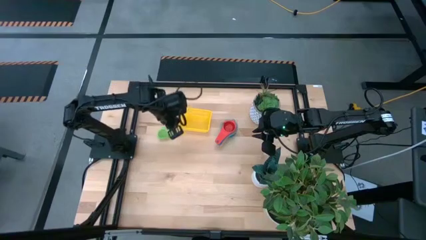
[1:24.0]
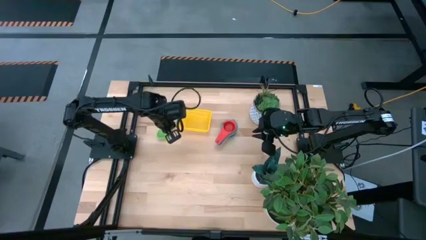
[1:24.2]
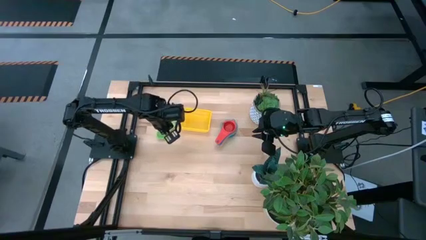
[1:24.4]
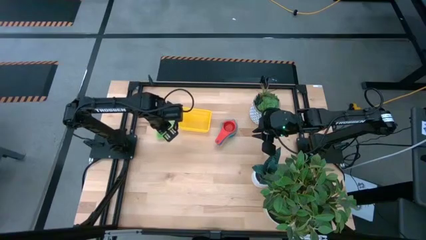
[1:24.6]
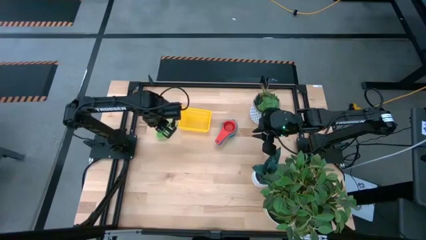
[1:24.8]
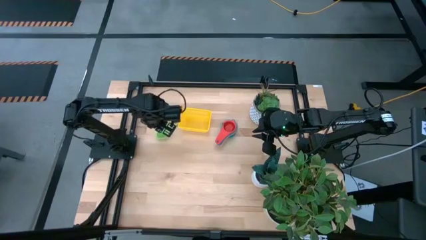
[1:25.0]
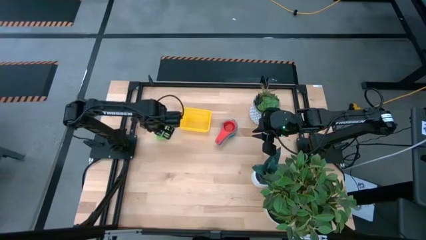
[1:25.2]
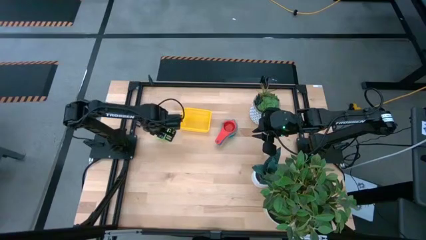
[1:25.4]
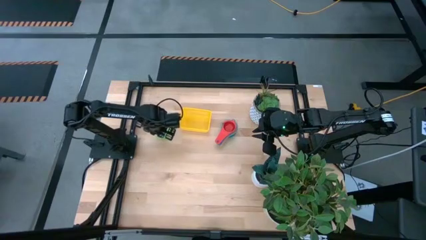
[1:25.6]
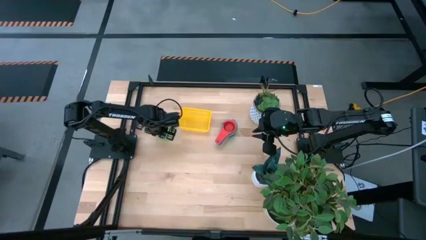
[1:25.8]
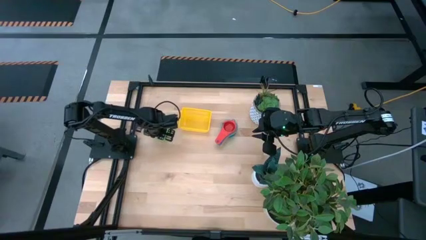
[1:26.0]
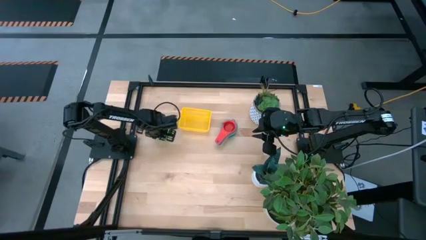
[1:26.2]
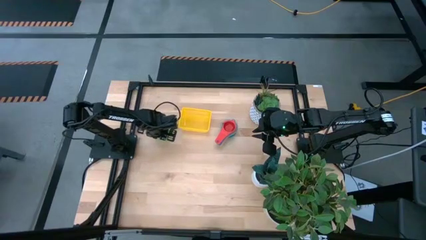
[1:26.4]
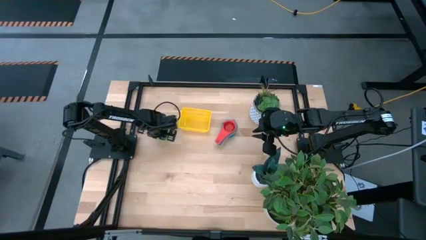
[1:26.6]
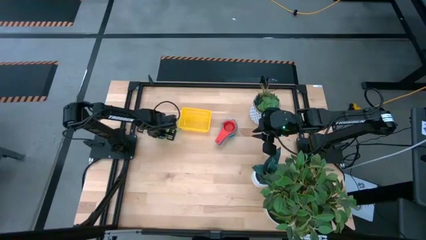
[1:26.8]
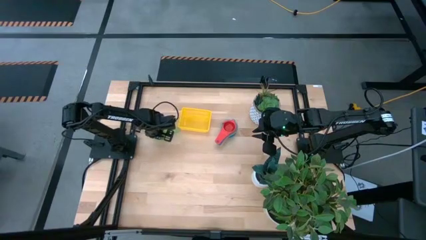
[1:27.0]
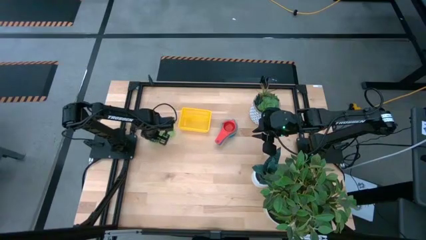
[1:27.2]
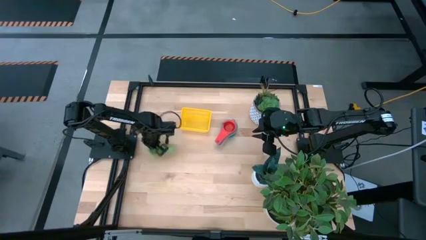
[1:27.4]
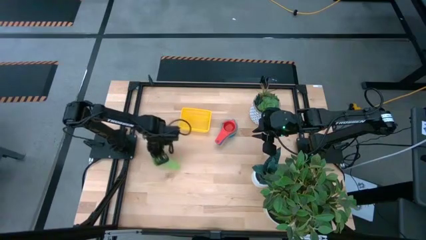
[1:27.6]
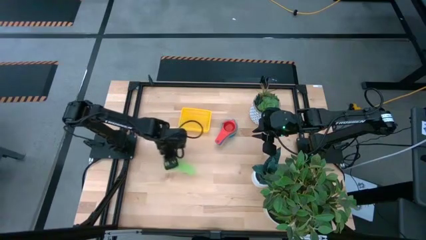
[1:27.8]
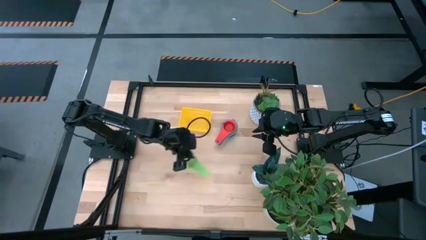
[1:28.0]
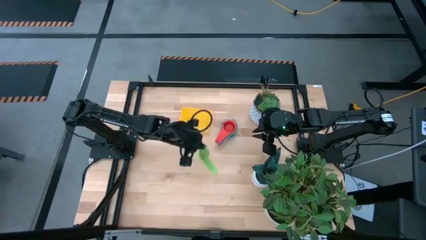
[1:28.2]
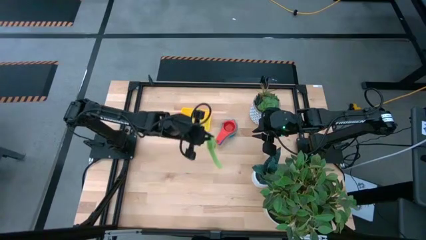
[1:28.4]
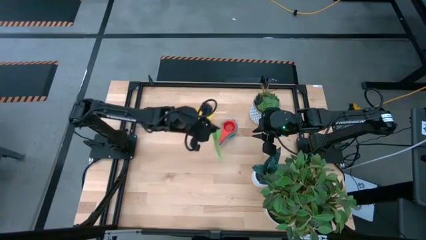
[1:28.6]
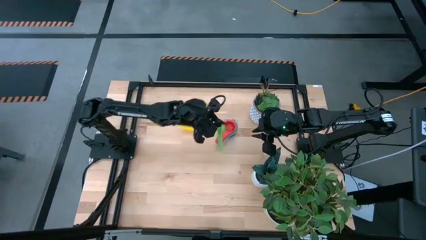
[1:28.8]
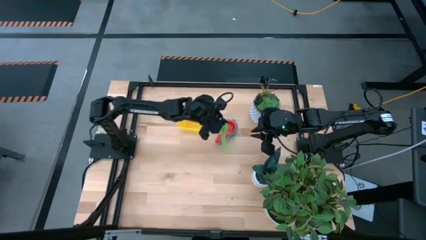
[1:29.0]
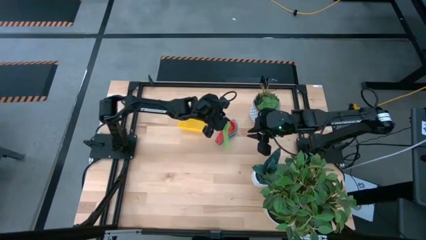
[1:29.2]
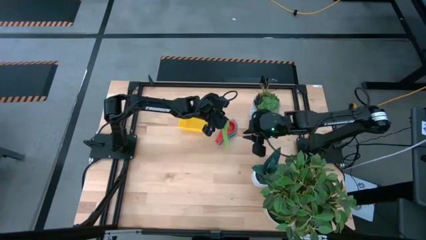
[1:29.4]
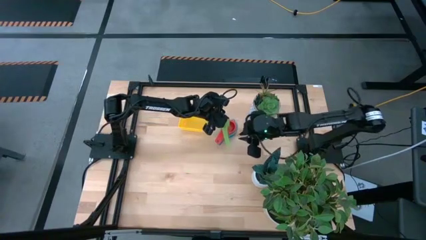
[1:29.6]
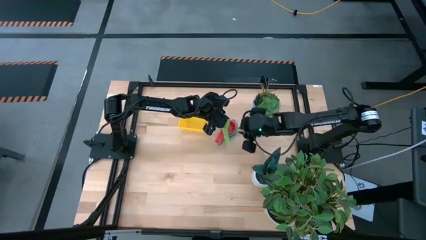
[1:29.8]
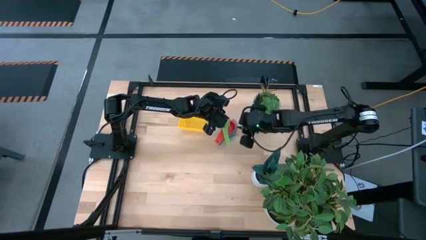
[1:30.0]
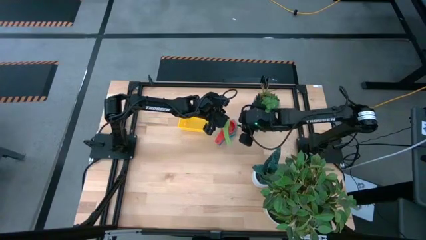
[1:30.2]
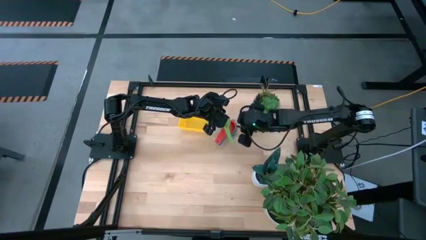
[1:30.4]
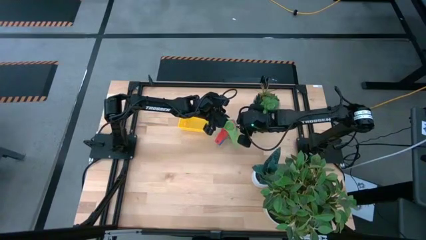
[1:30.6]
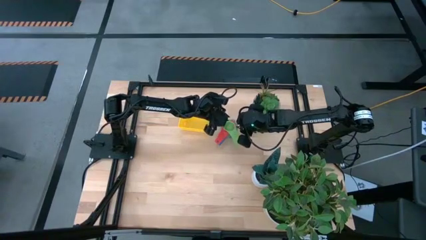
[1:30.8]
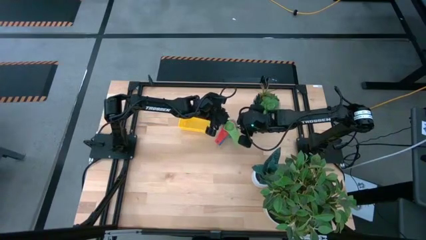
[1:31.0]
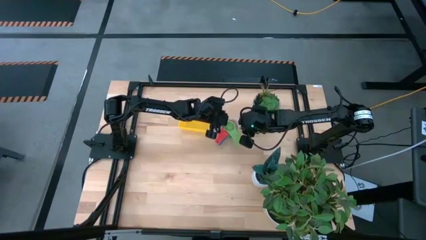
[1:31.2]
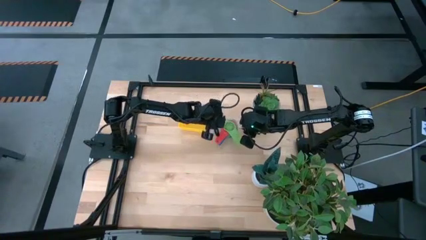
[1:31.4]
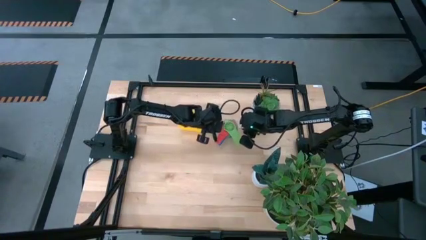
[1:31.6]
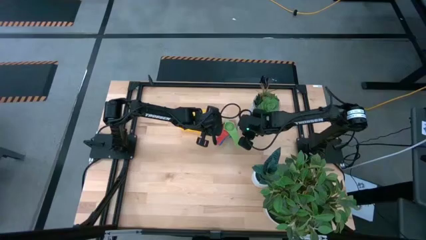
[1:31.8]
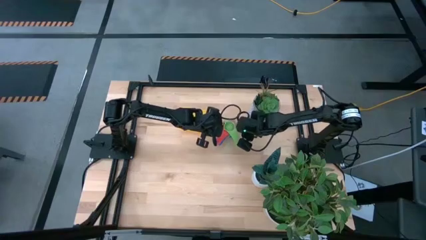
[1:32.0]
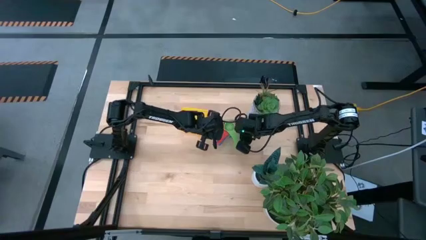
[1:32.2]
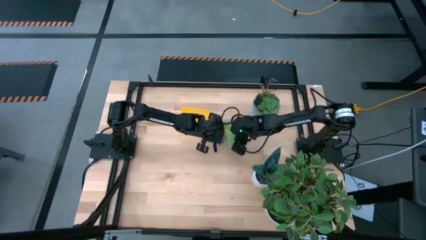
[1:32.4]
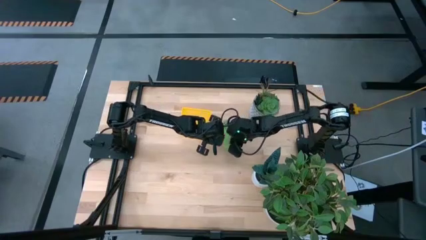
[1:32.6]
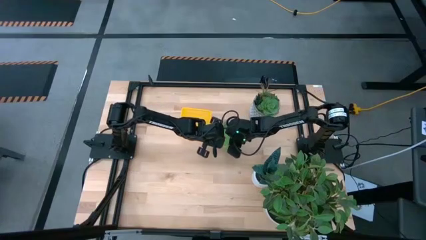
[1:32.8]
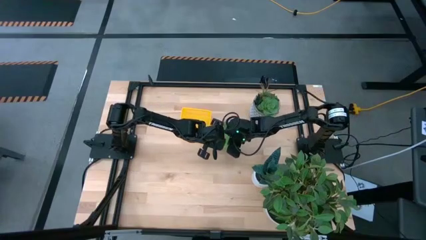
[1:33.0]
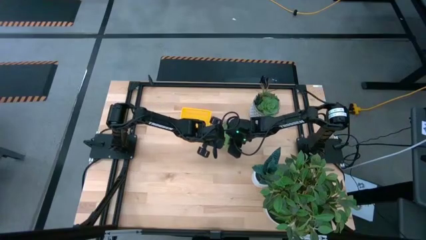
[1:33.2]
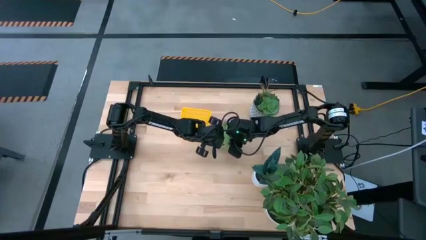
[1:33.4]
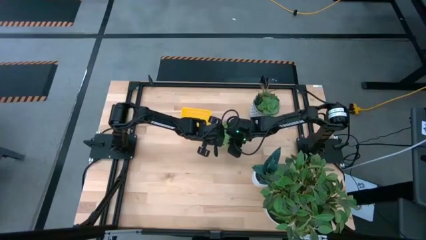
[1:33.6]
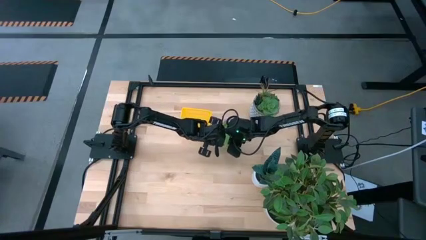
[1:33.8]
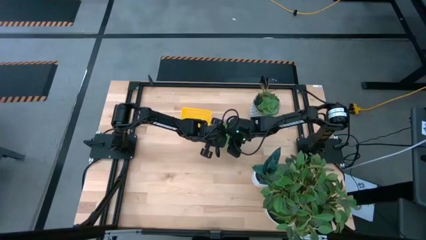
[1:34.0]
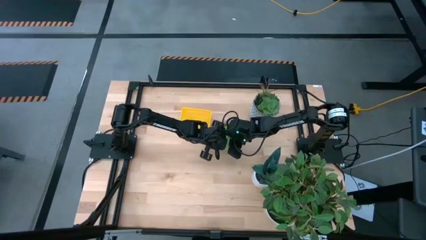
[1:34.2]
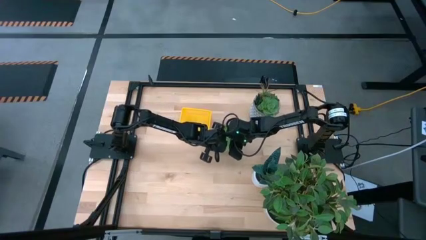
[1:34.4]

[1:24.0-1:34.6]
Task: Nest measuring cups in basket
Stack the green measuring cup into the red measuring cup

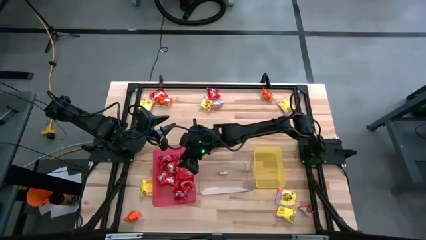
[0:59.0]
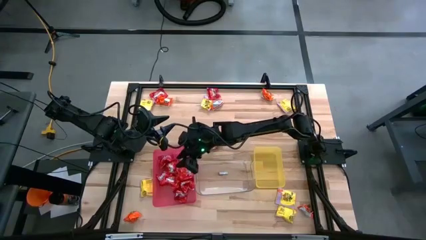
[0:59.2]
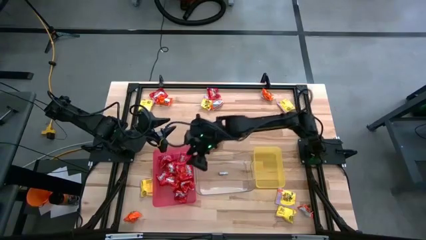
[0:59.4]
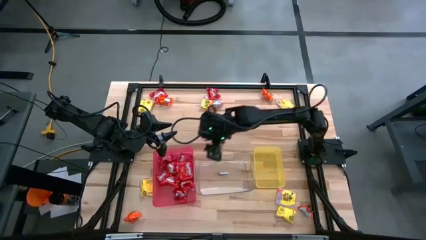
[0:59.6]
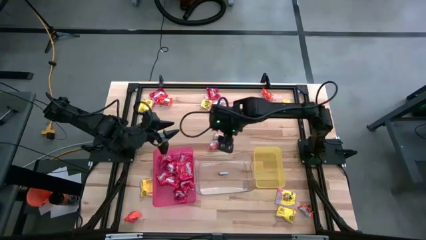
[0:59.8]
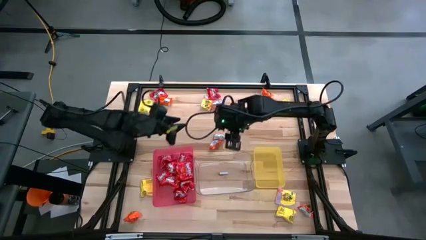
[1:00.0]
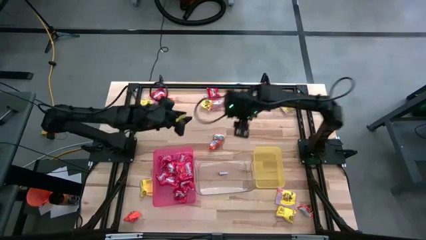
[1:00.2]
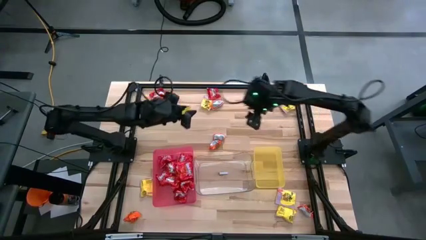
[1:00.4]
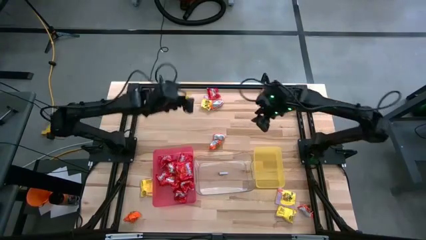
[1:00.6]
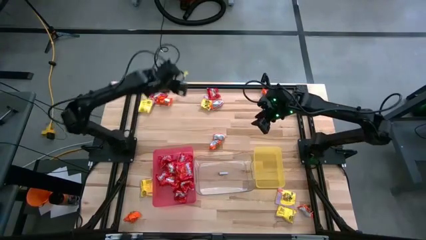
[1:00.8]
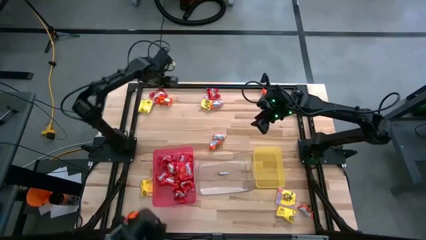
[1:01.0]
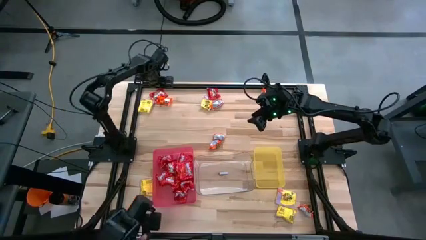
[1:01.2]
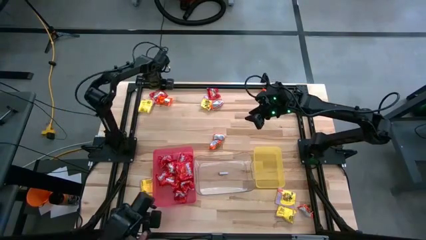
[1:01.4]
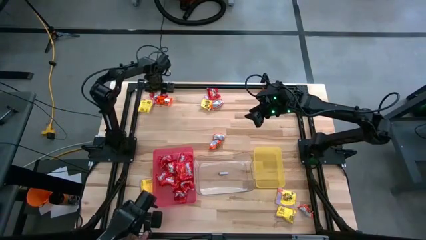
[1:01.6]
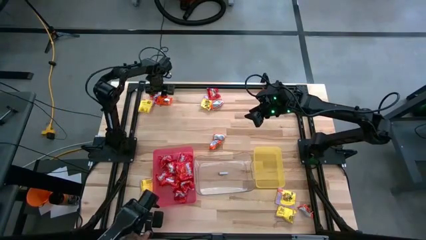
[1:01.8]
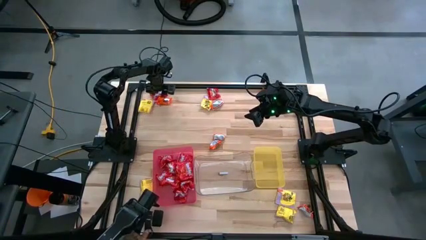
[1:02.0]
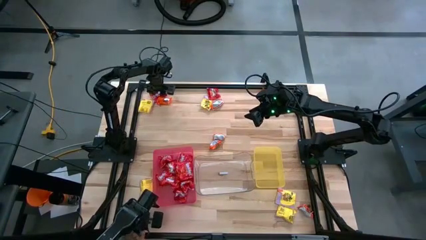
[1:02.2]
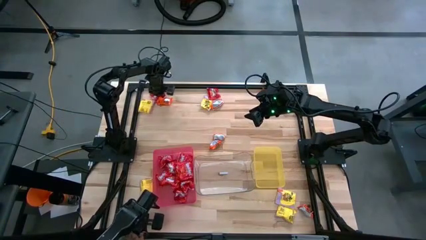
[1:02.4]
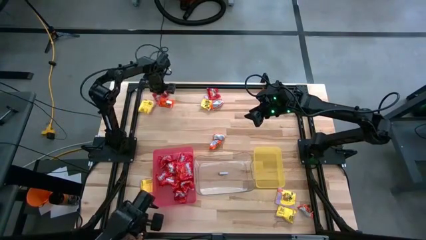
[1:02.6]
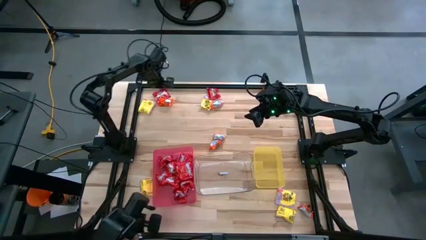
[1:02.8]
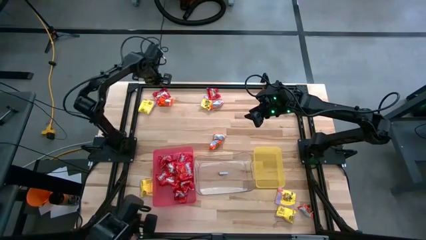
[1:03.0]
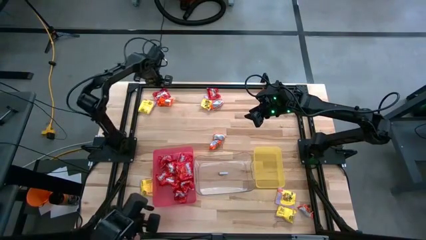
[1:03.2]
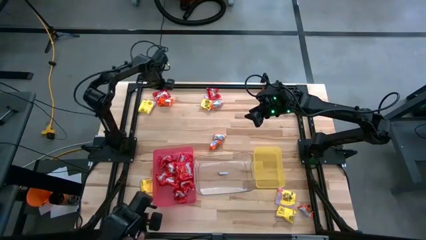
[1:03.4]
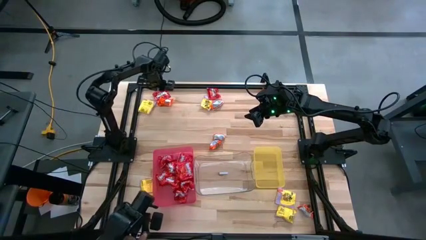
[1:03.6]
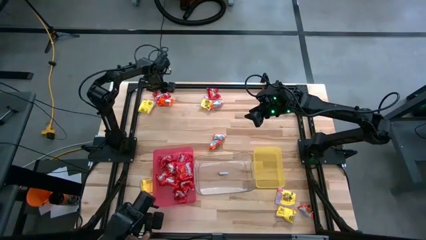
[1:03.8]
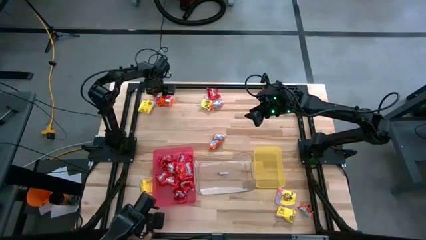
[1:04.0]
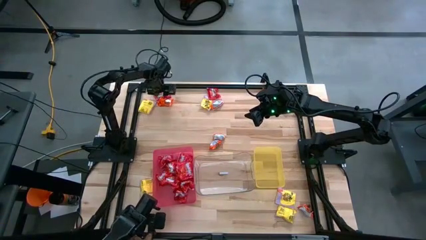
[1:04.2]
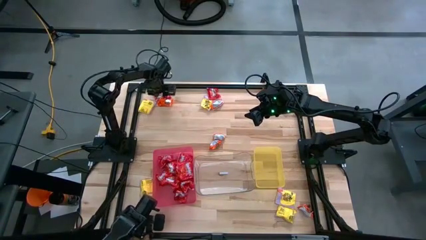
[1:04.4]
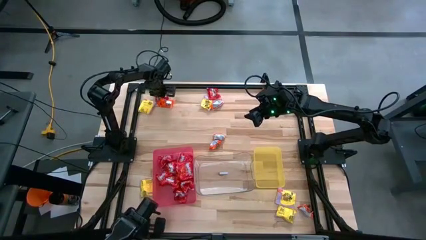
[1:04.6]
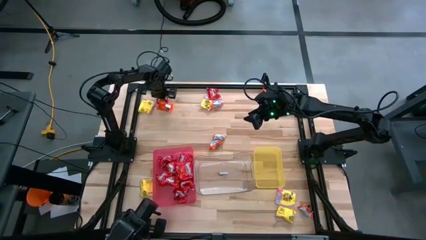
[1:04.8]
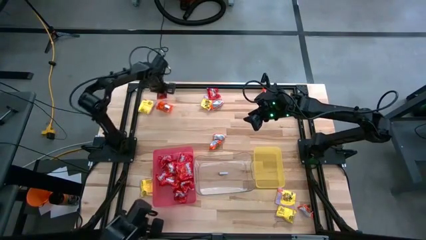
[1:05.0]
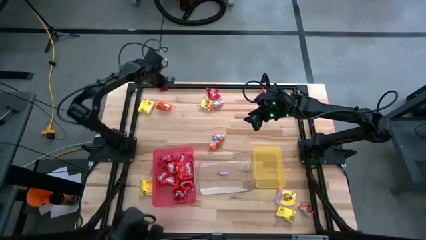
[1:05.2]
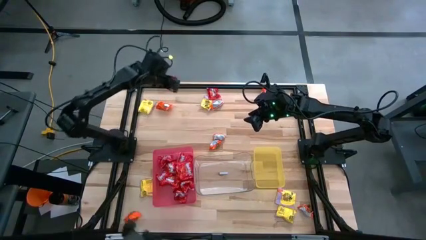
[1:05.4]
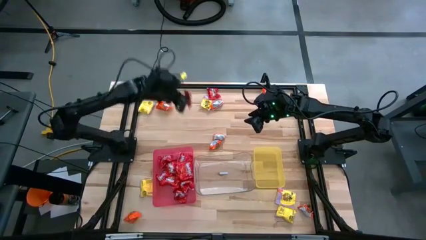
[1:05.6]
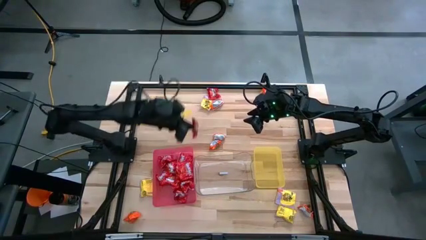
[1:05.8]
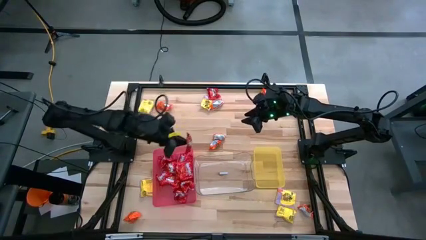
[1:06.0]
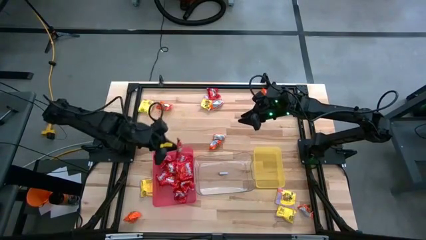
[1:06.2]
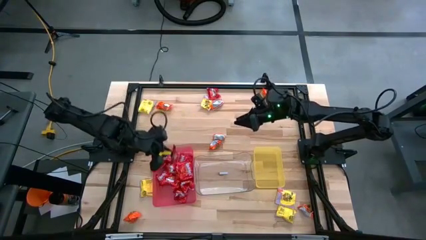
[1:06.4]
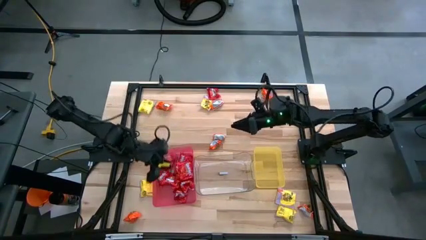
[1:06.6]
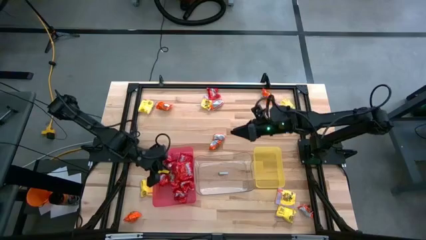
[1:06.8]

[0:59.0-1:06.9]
Task: Sort candy
Put the red candy into the red bin
